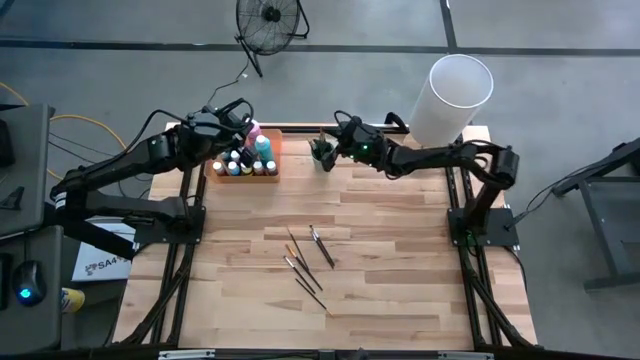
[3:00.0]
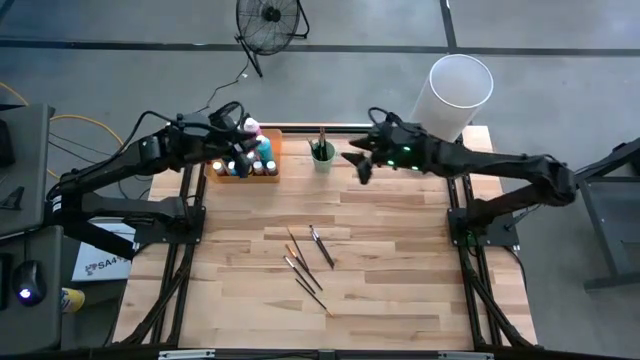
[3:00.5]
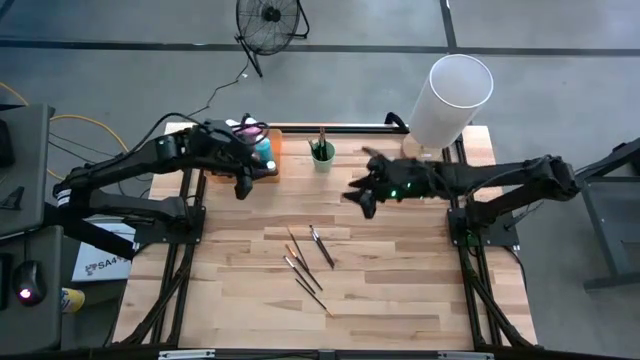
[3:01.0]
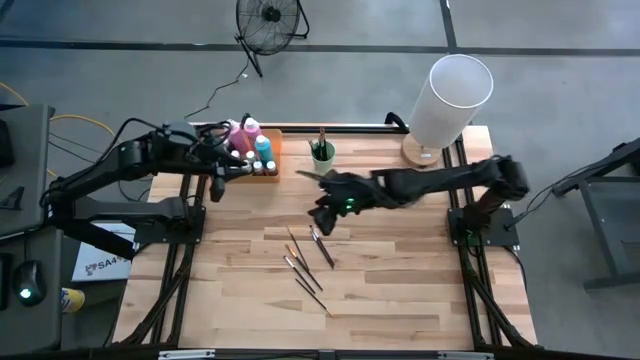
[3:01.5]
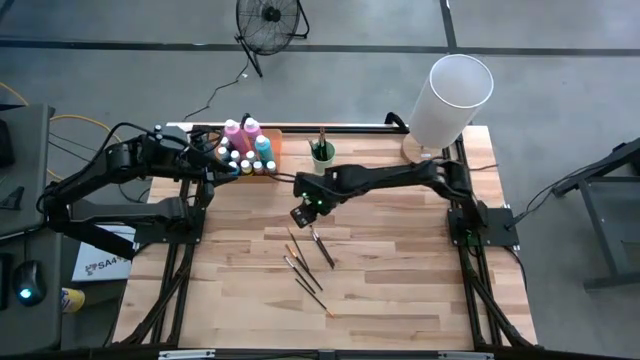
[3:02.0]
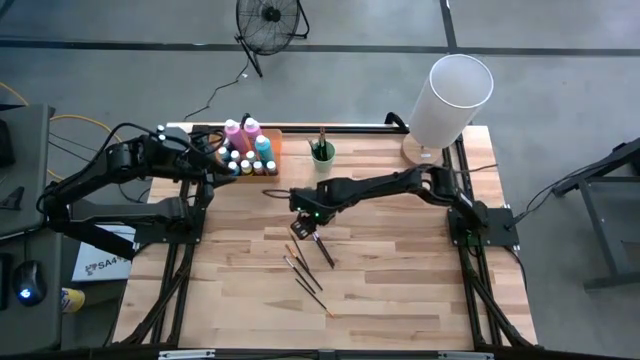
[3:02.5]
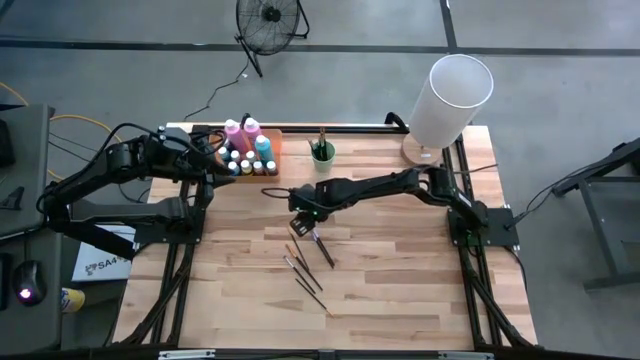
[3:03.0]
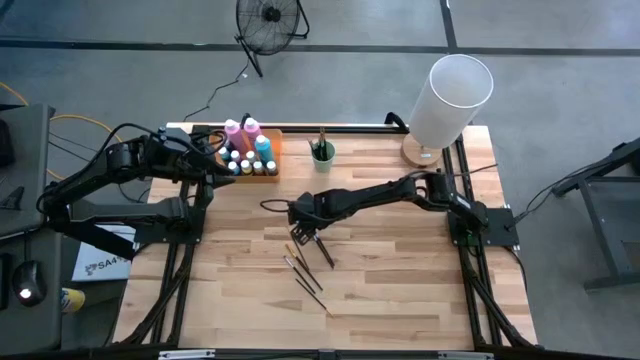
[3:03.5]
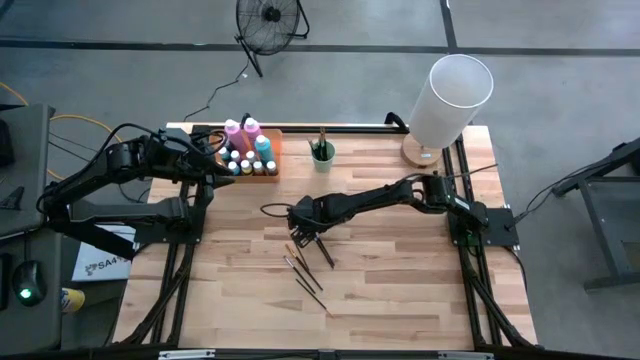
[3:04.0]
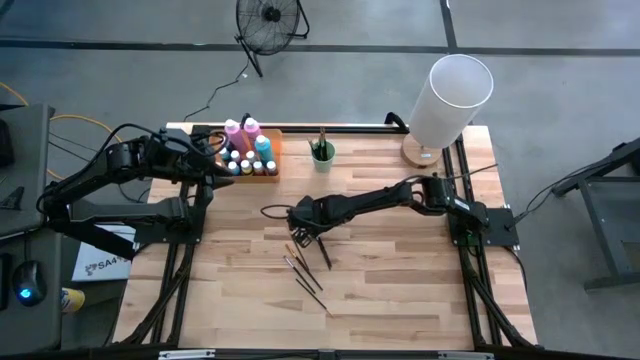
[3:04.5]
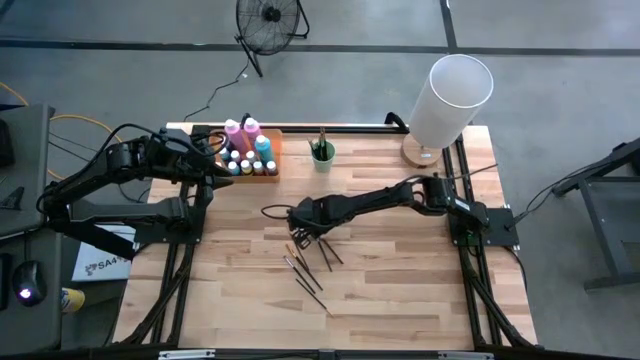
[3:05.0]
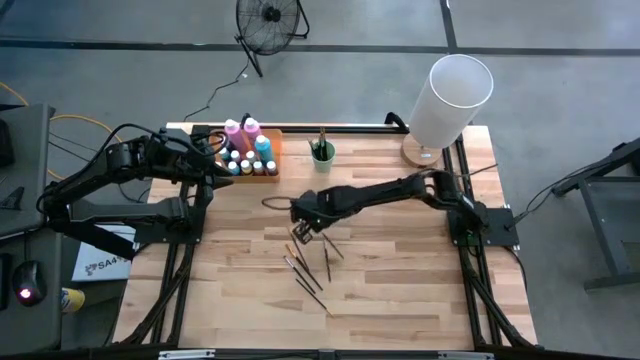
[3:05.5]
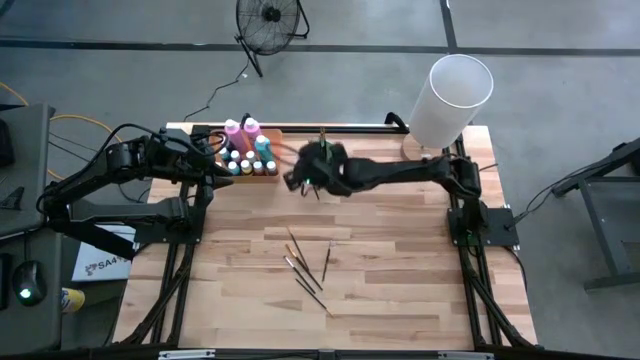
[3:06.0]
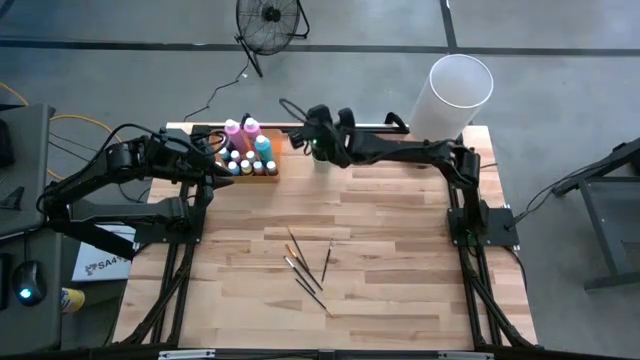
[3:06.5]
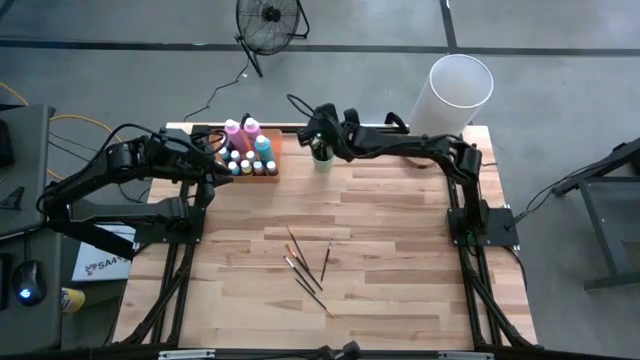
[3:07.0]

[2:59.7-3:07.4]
Task: Pick & Place Paint Supplies
Put the black paint brush into the green cup

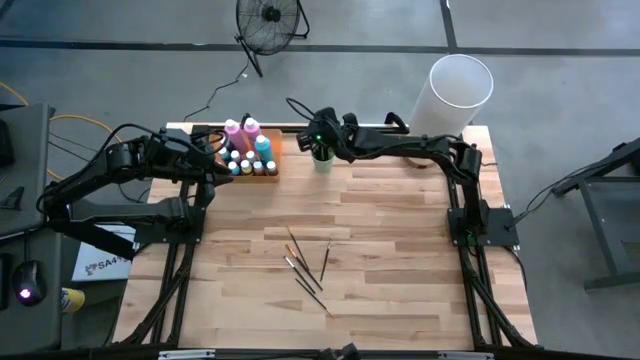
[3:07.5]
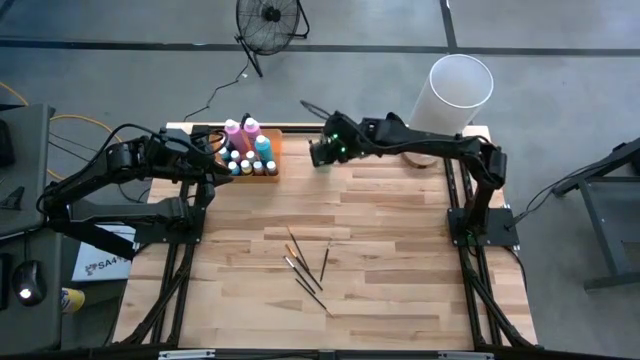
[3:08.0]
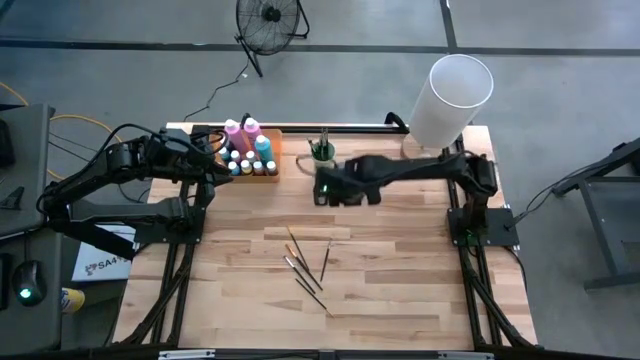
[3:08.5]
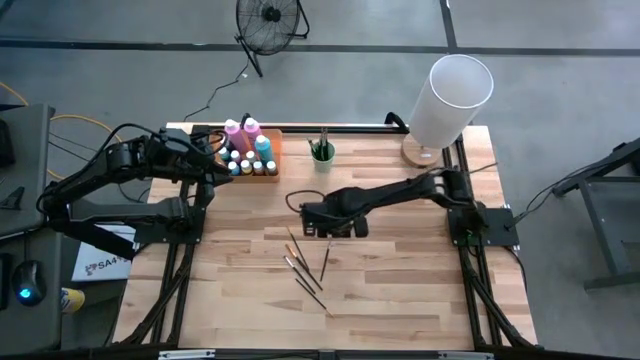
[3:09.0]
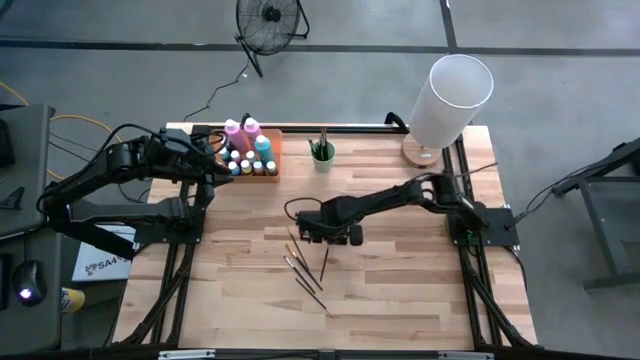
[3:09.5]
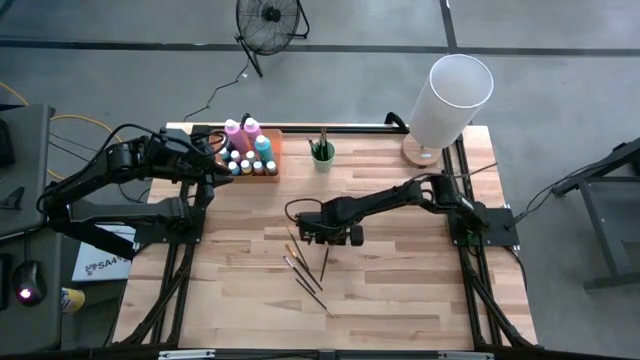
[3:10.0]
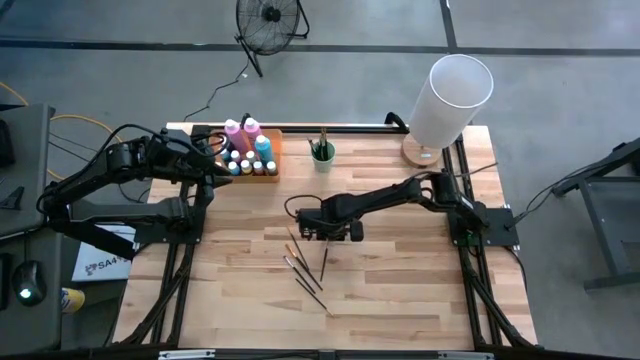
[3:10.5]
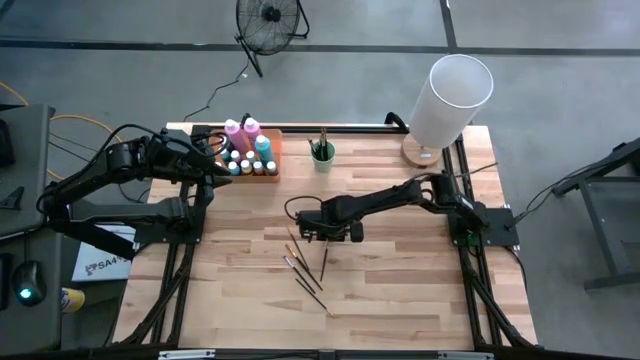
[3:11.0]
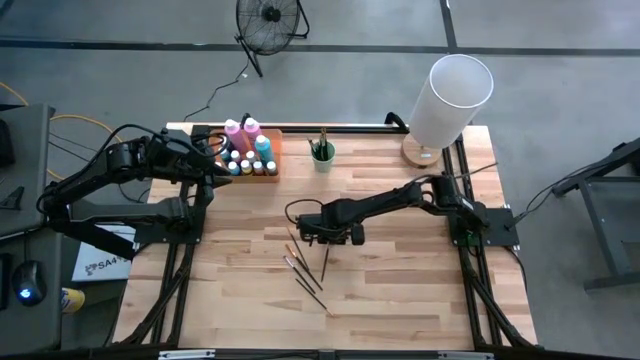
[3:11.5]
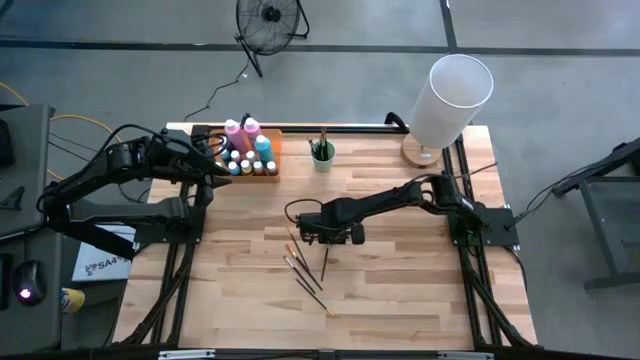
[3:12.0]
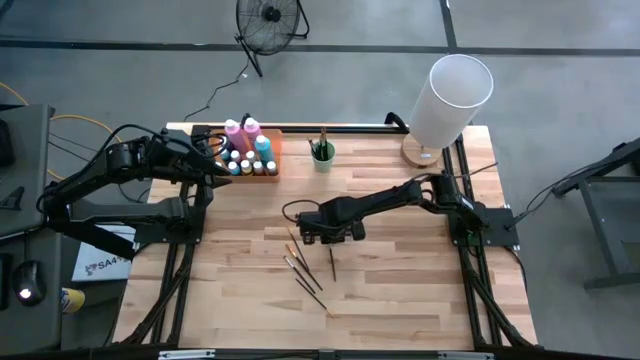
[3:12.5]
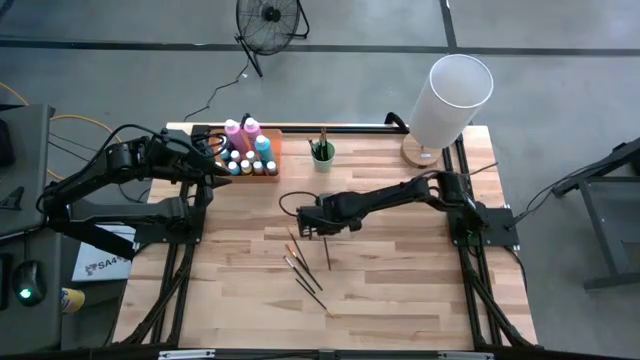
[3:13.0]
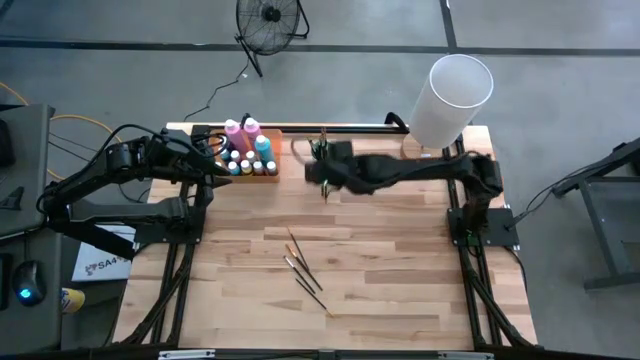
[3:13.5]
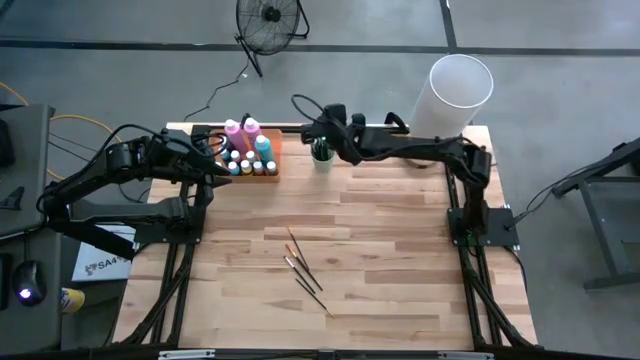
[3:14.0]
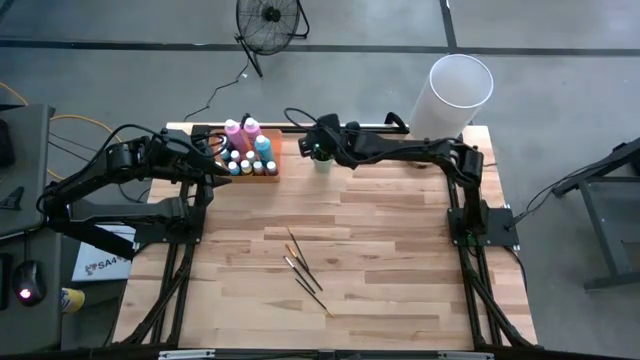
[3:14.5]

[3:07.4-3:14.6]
Put the black paint brush into the green cup

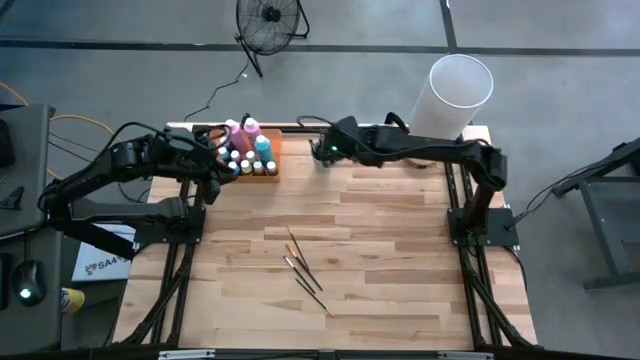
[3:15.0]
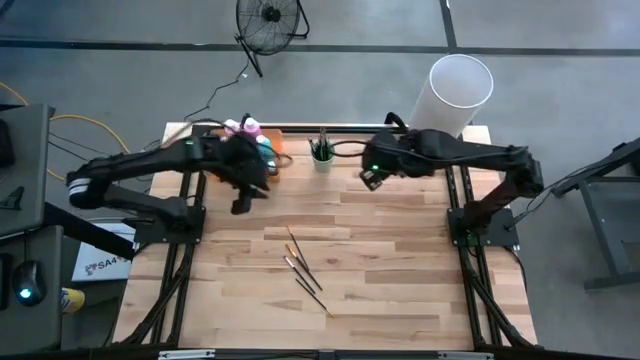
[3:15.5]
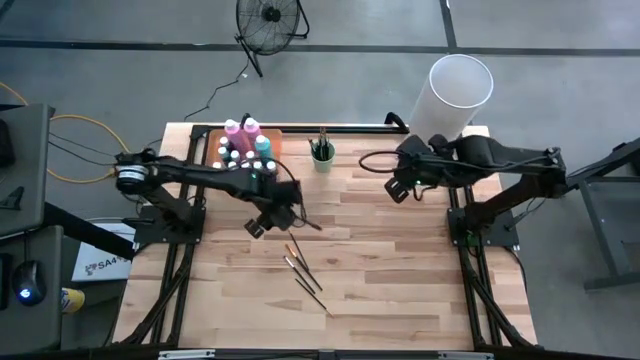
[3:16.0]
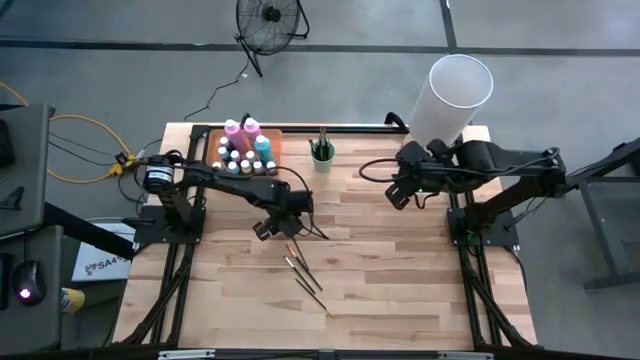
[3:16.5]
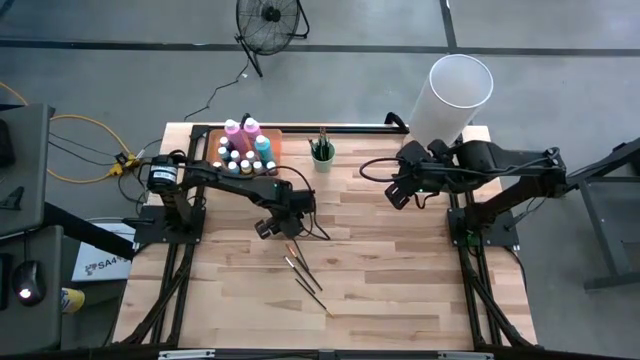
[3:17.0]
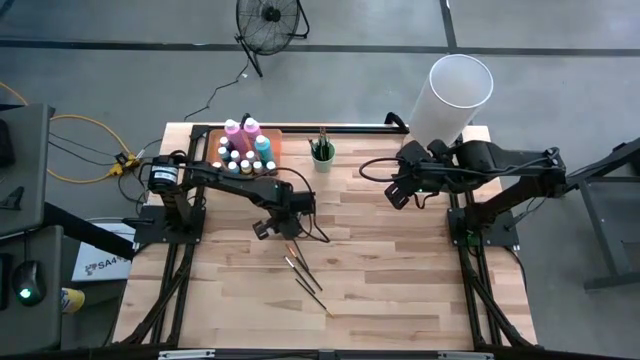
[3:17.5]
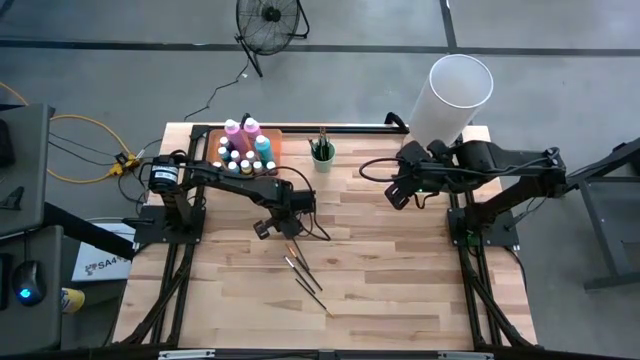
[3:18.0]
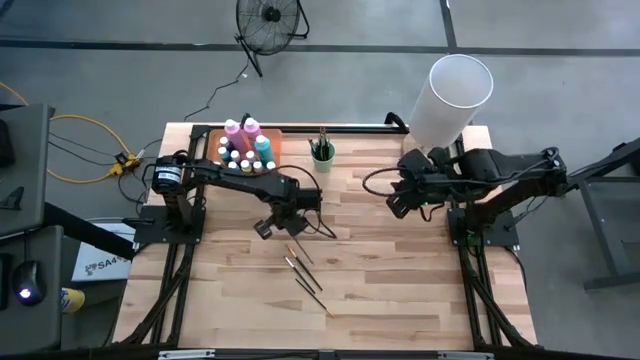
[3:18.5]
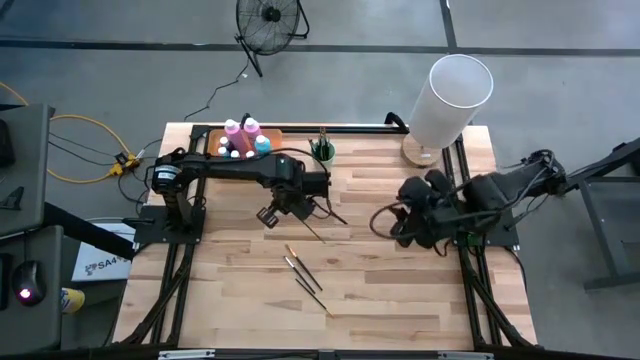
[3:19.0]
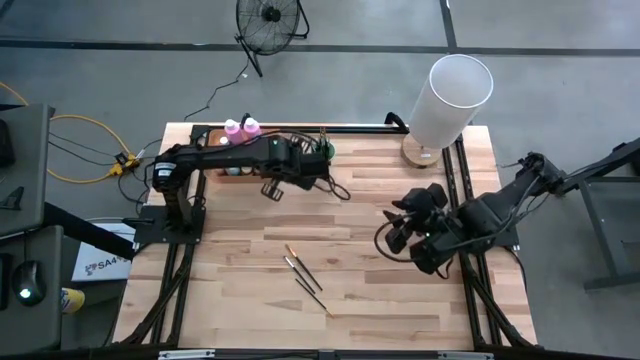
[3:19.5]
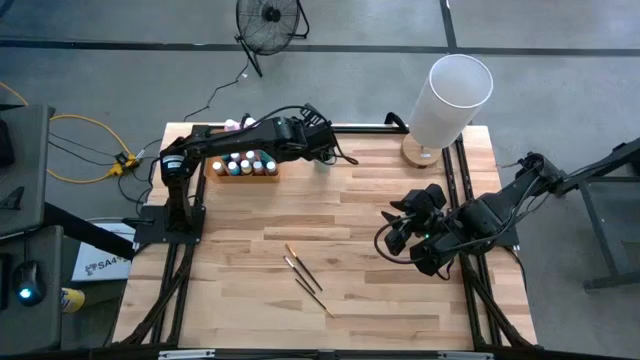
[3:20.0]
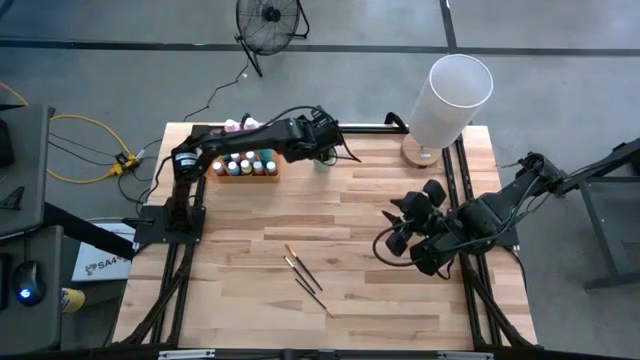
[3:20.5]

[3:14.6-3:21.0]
Put the black paint brush into the green cup

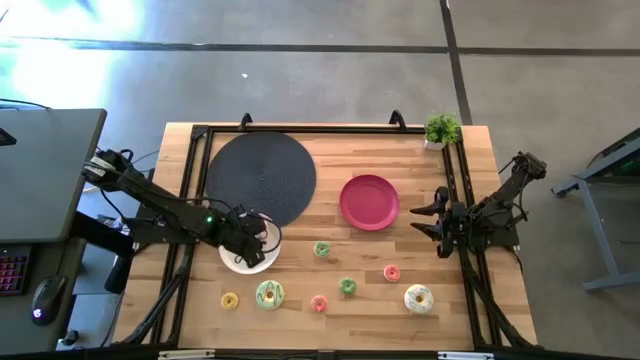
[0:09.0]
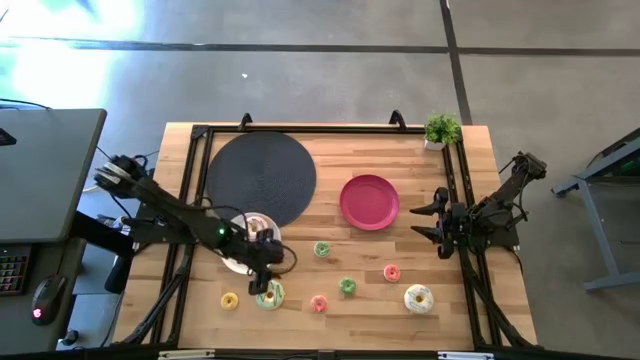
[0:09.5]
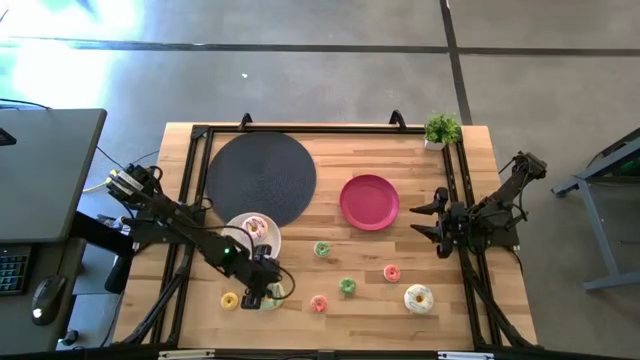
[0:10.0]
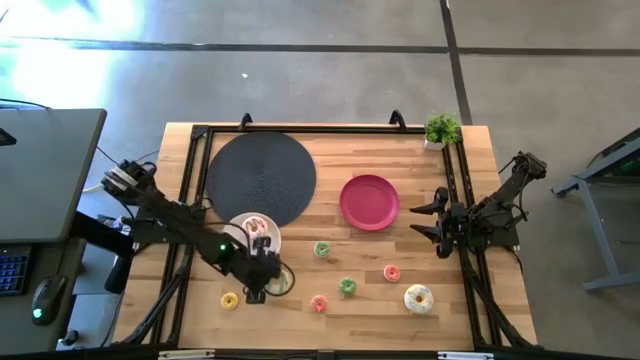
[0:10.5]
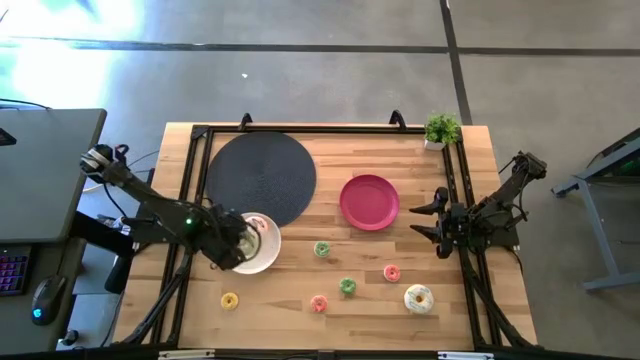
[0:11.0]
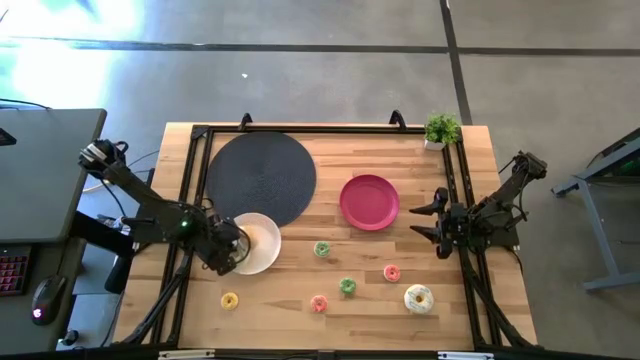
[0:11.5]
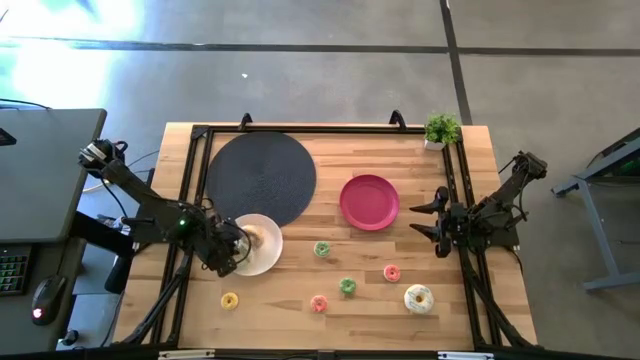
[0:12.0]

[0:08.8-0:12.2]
Task: Pick & Place donuts
Put the big light green donut on the white plate
